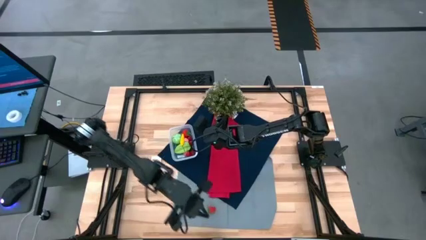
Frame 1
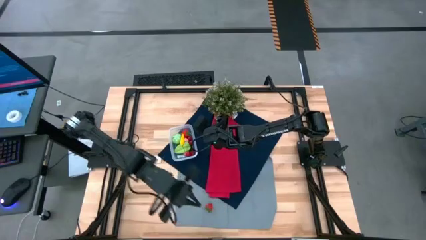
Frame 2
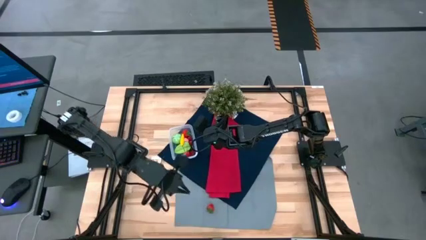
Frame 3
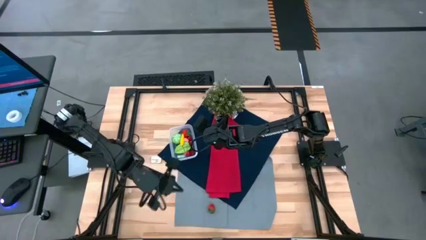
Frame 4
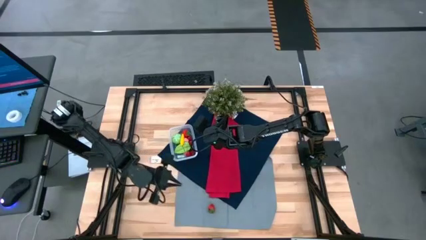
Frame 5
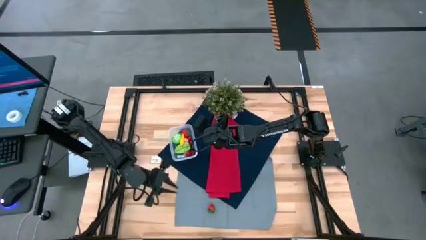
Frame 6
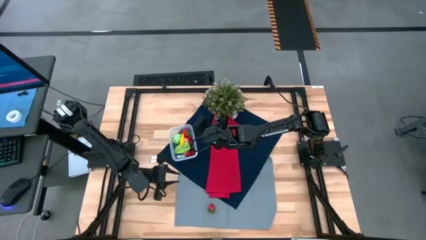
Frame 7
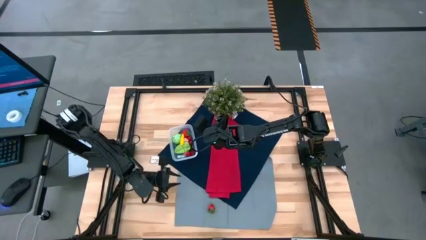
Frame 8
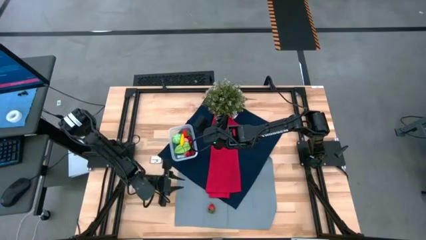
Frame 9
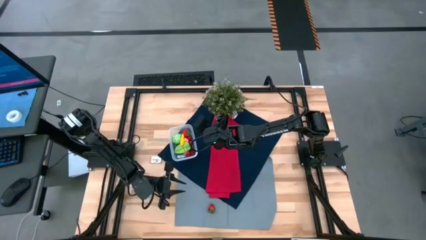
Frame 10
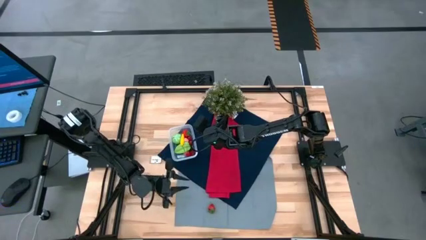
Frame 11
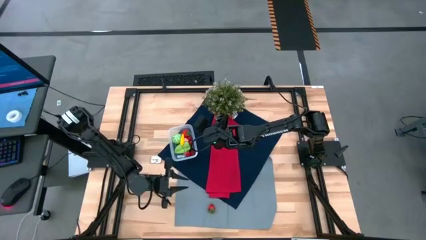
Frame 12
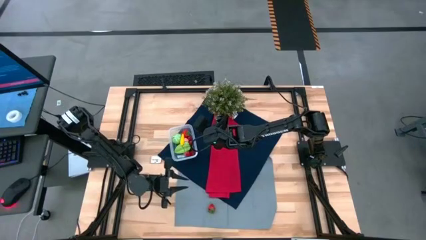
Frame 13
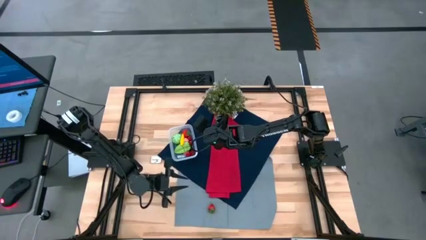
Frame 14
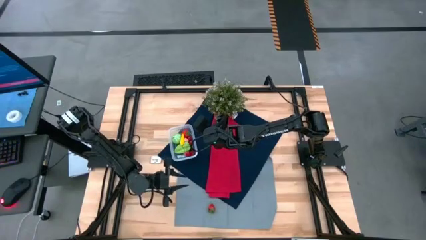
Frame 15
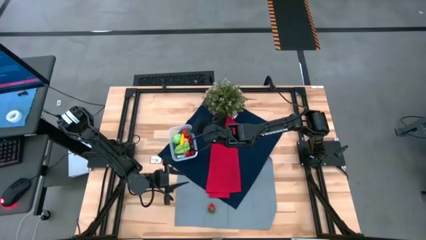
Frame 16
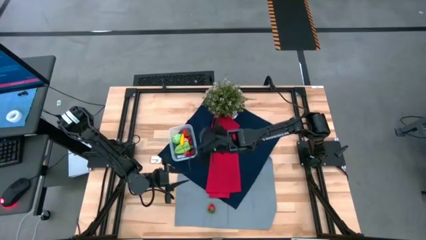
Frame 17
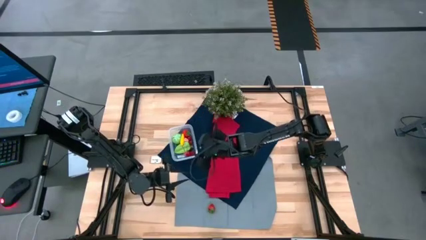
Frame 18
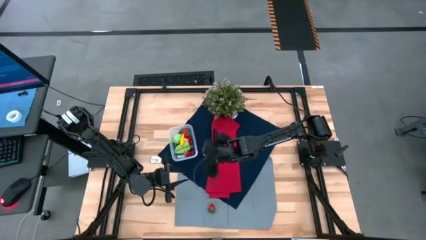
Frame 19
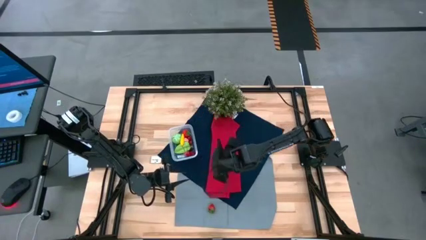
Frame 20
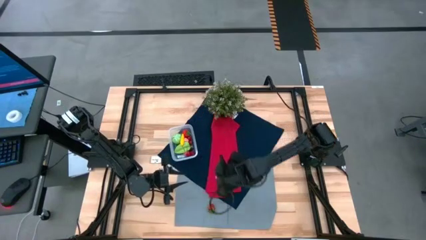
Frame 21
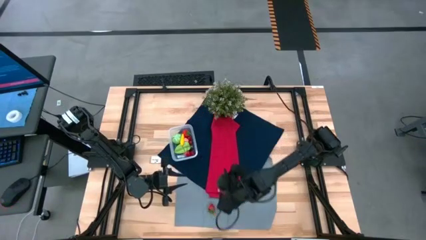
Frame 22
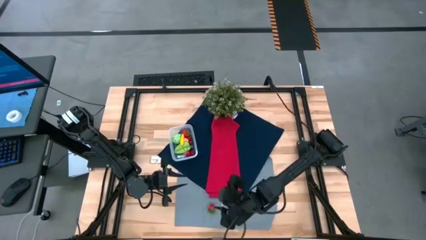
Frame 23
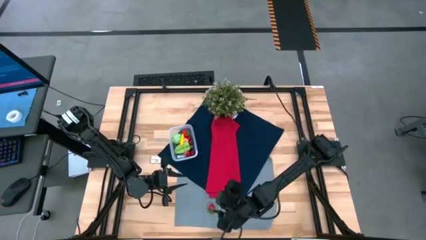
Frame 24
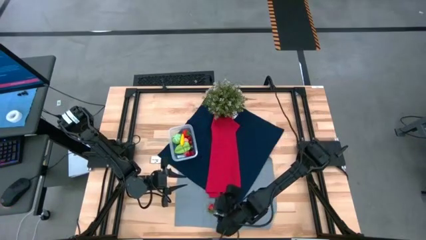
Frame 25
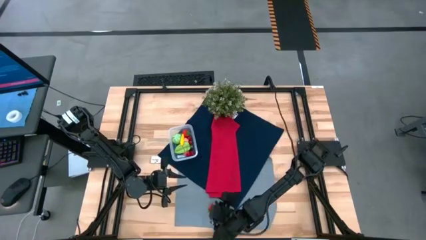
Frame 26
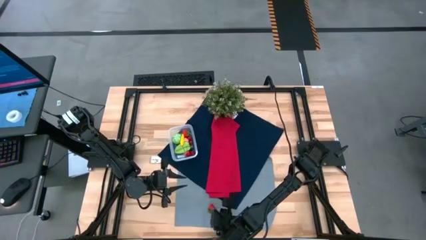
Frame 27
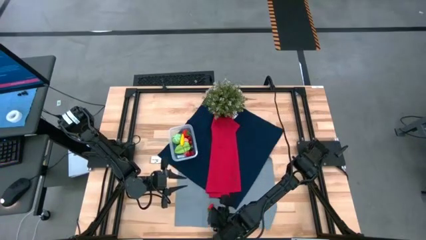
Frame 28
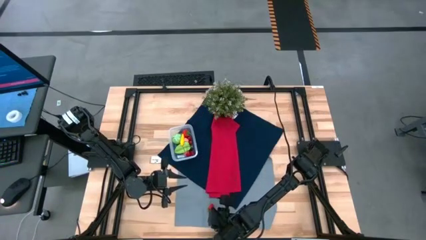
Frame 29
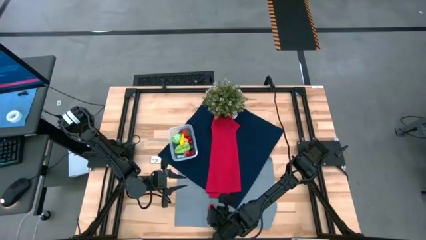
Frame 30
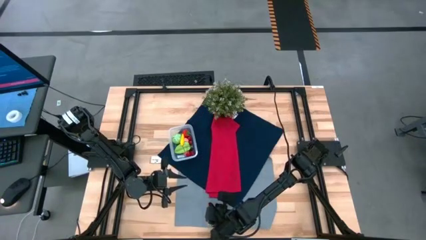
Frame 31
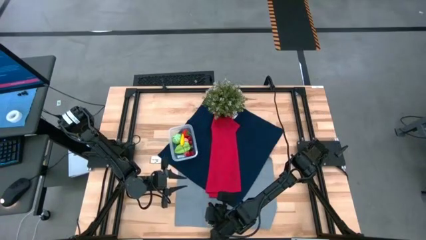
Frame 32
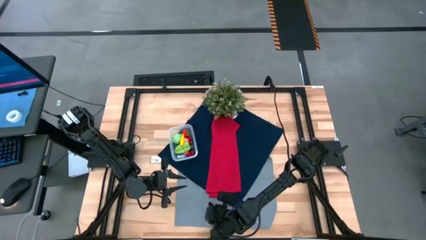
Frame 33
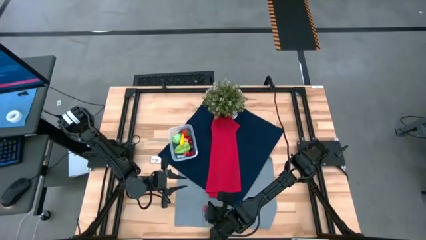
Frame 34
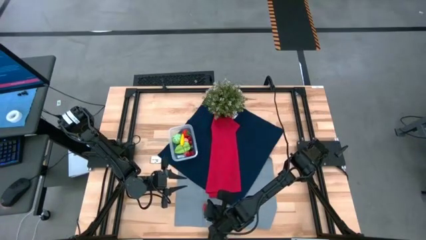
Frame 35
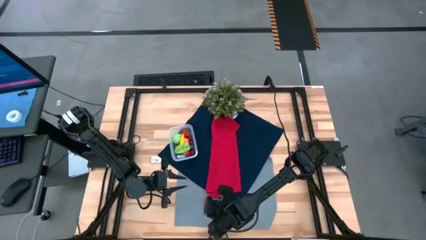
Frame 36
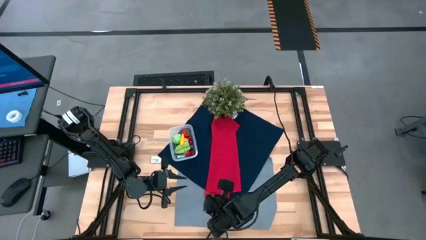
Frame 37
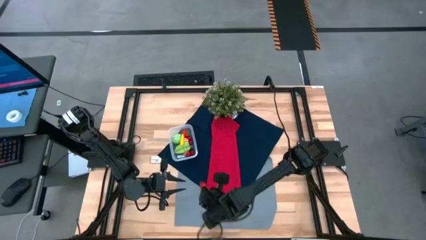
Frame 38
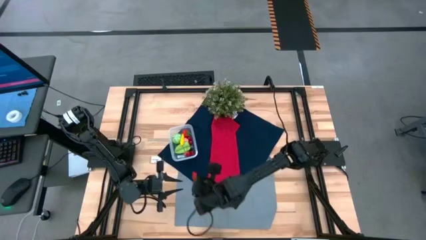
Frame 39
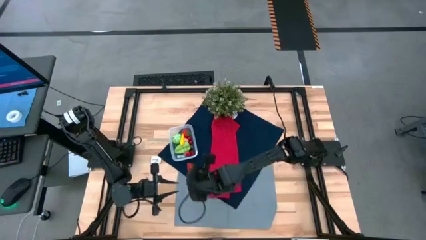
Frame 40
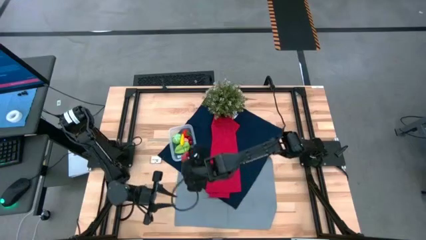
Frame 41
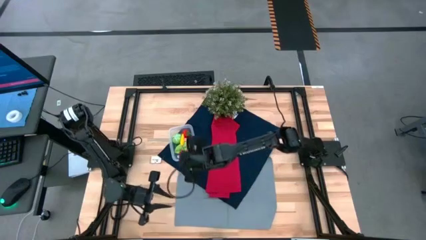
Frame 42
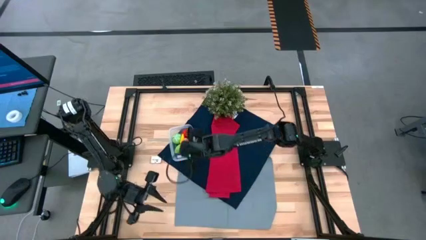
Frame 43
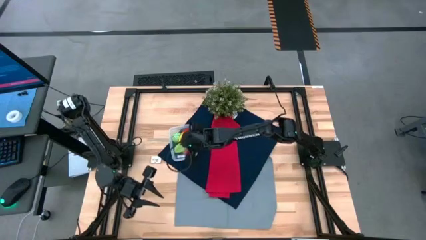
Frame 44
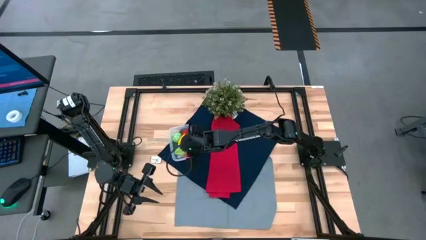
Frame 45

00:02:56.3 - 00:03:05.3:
Task: Pick and placing Produce into tupperware
Put the red strawberry into the transparent bin

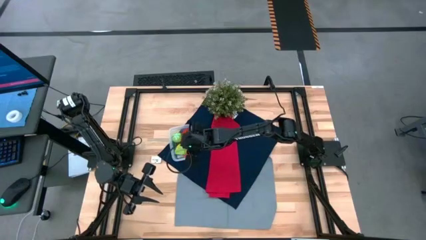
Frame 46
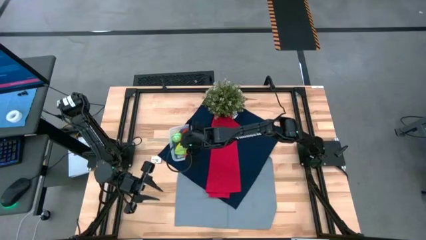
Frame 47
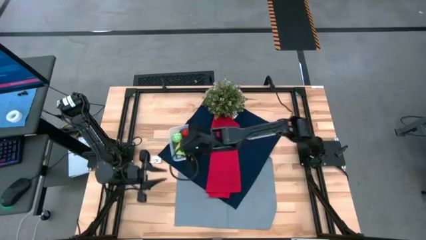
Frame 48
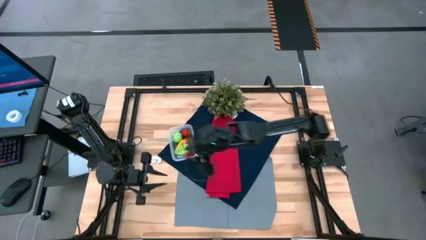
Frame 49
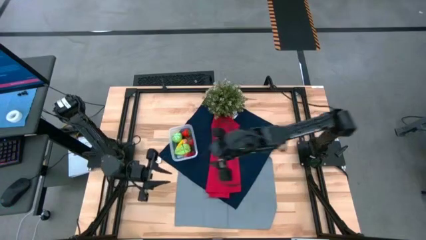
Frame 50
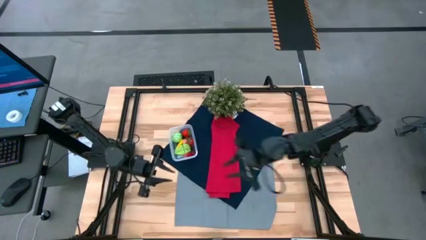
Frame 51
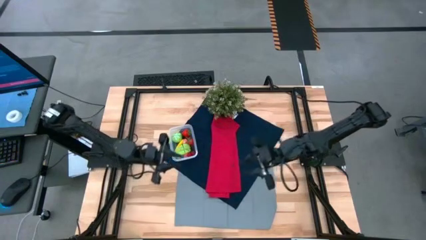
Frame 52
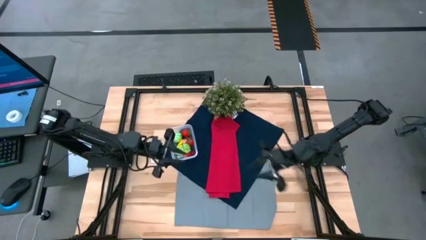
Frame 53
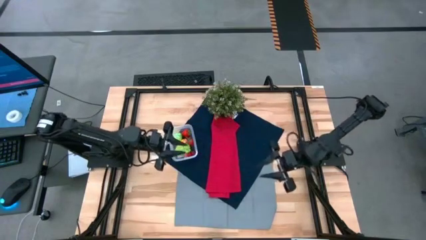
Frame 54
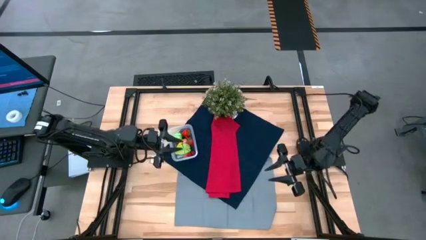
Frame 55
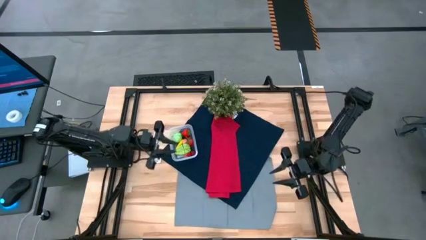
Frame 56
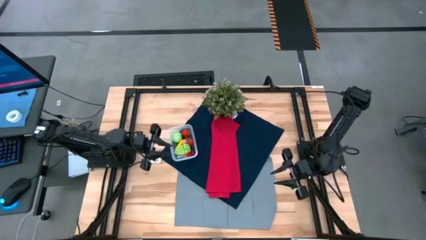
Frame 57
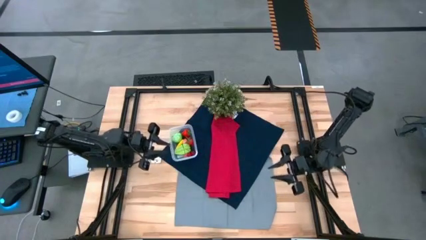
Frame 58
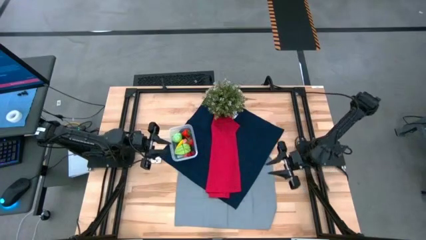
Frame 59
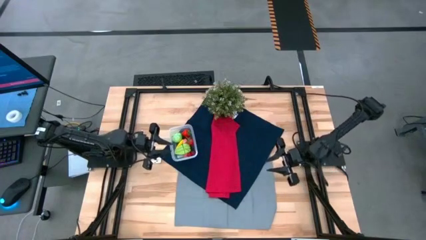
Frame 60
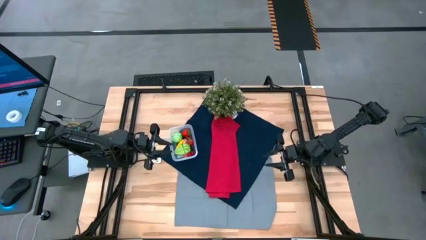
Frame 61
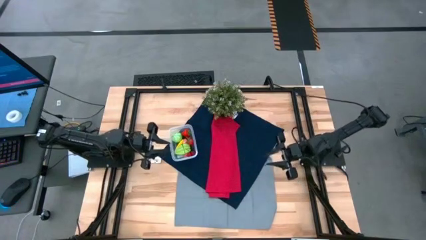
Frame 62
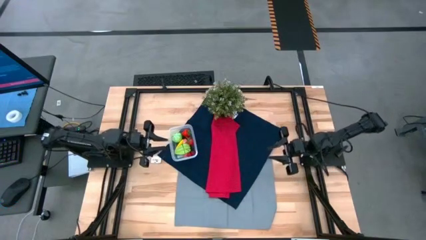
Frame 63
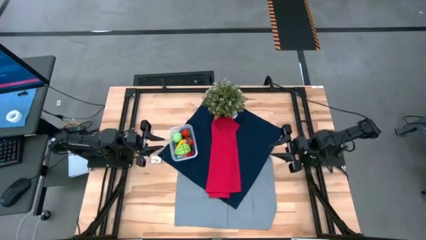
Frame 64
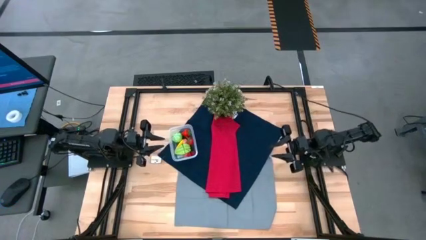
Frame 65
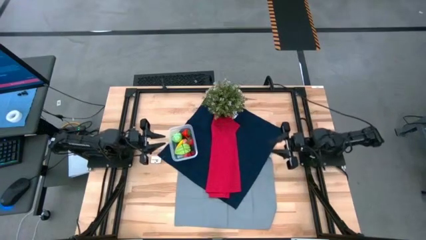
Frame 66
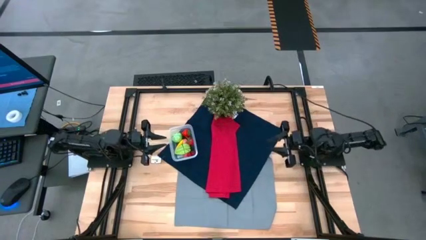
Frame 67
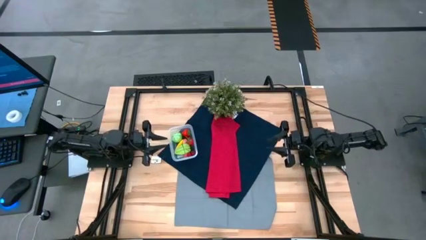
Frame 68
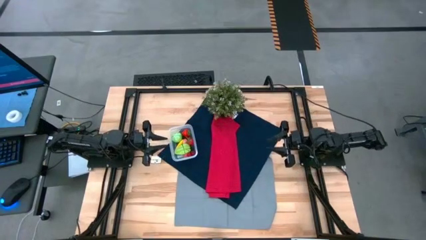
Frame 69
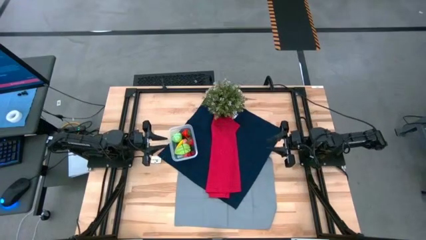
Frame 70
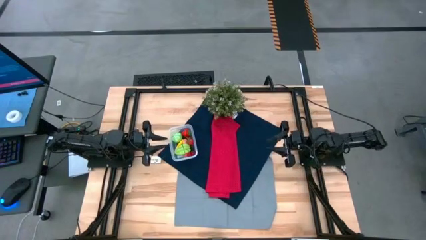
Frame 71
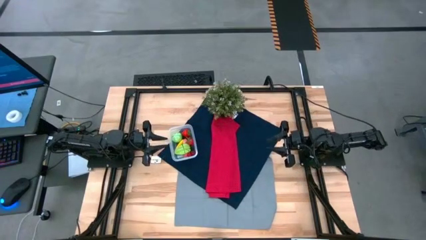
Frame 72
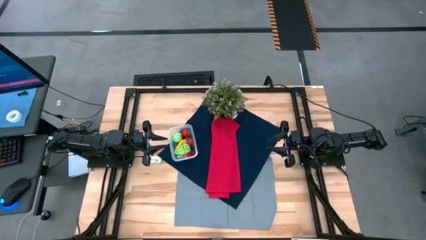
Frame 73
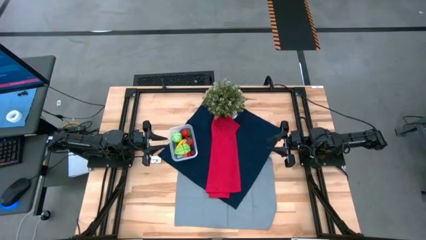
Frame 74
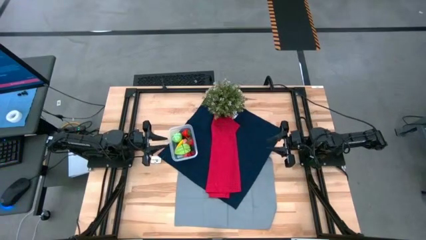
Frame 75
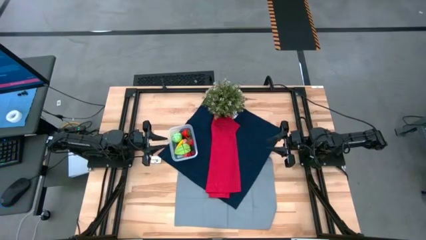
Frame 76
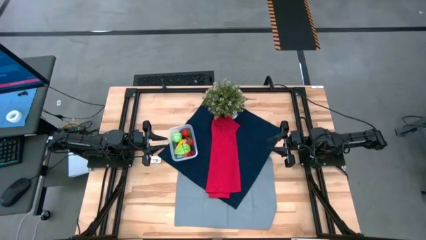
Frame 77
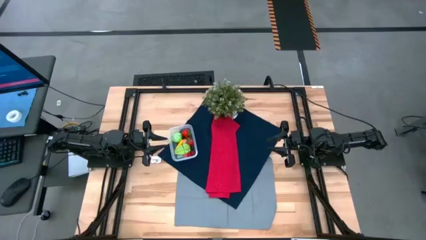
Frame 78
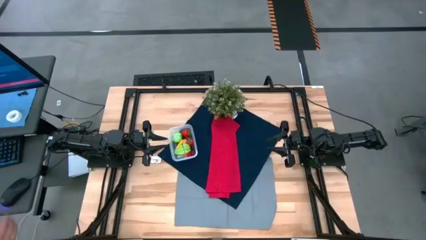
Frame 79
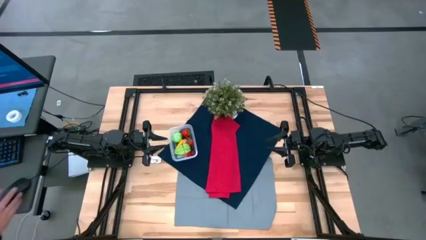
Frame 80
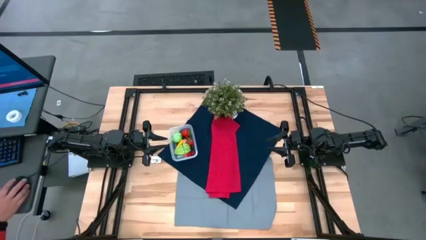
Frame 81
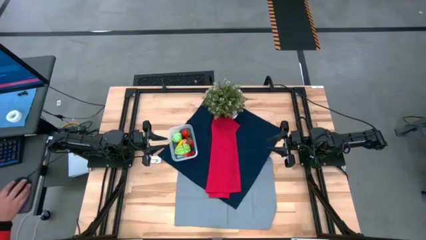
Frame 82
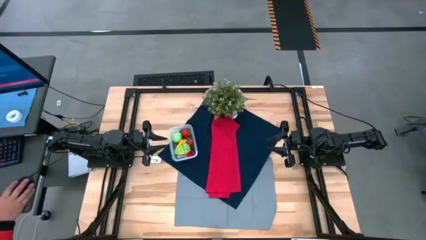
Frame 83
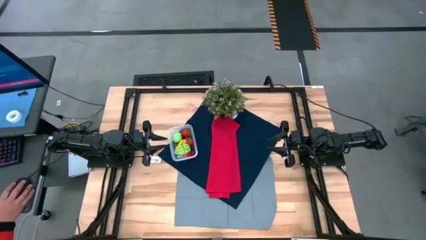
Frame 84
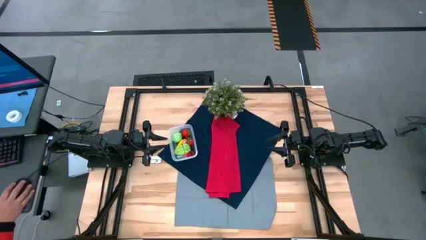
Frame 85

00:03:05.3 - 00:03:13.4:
Return to Home Position
